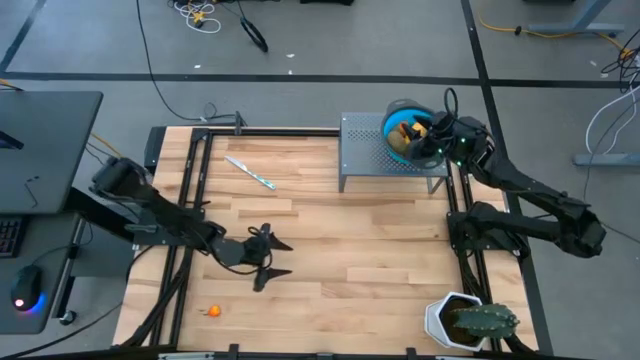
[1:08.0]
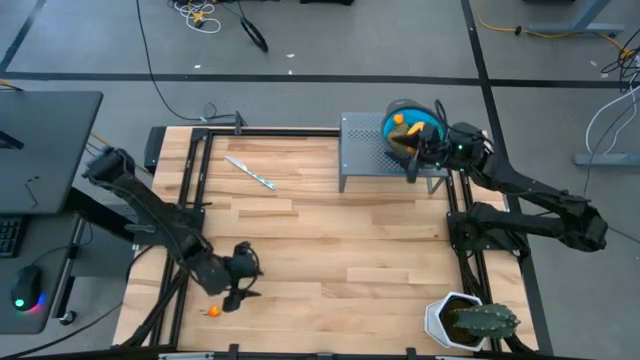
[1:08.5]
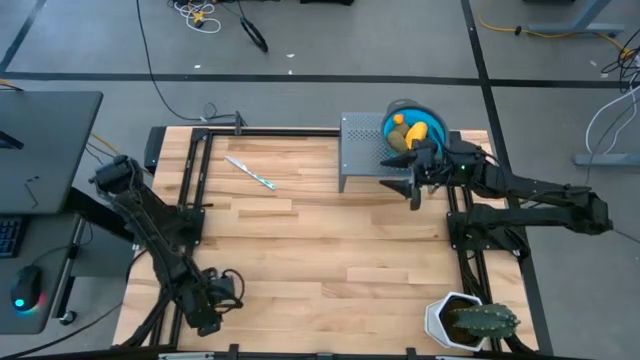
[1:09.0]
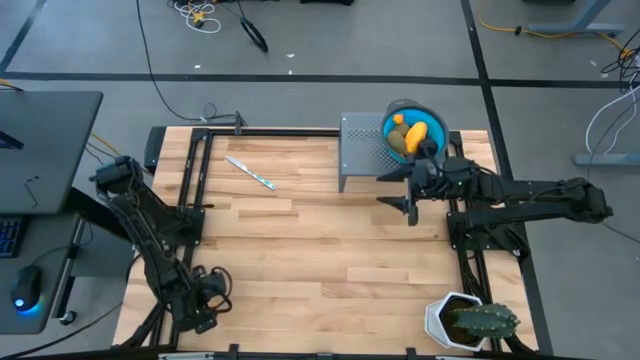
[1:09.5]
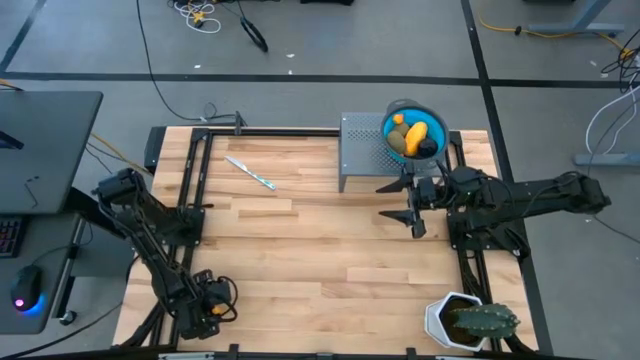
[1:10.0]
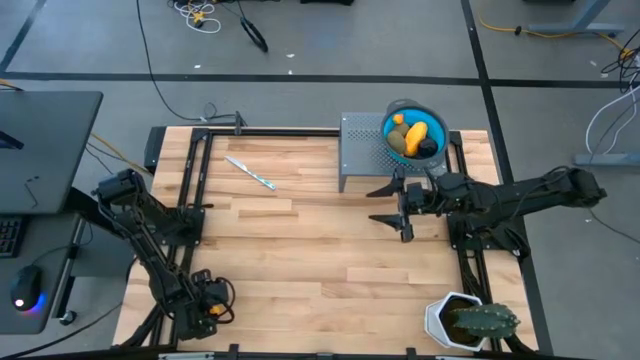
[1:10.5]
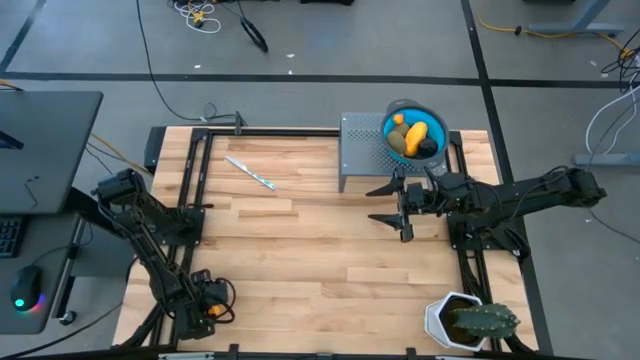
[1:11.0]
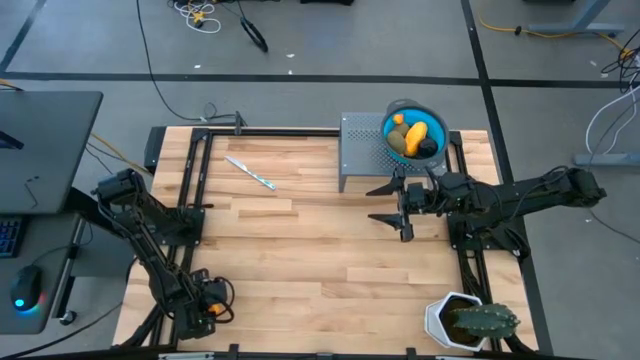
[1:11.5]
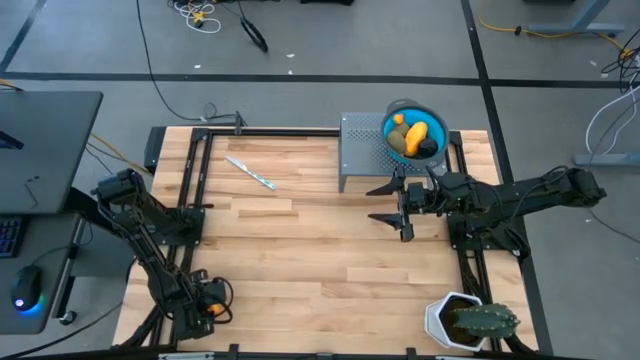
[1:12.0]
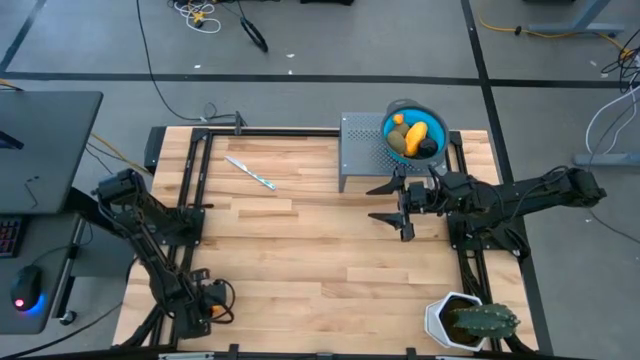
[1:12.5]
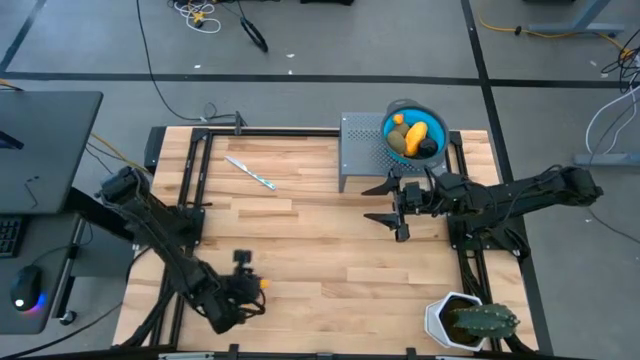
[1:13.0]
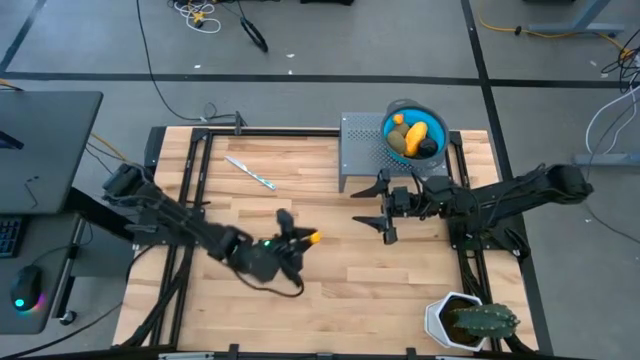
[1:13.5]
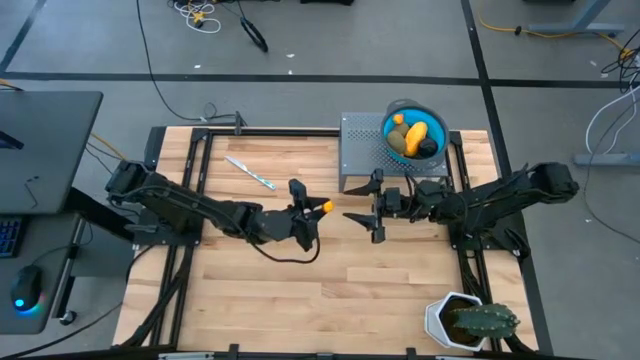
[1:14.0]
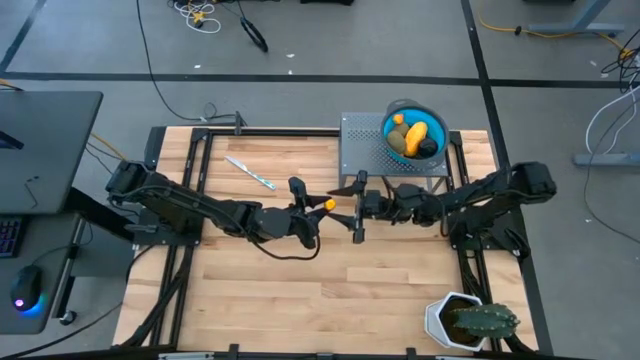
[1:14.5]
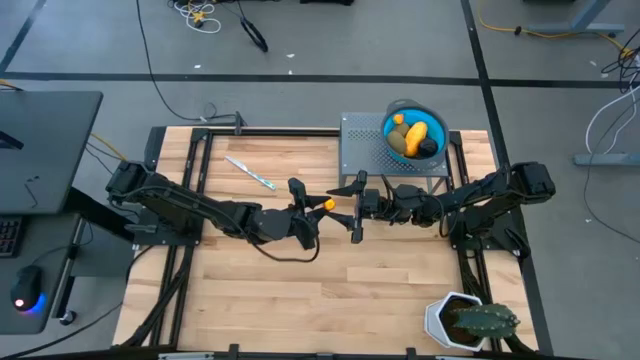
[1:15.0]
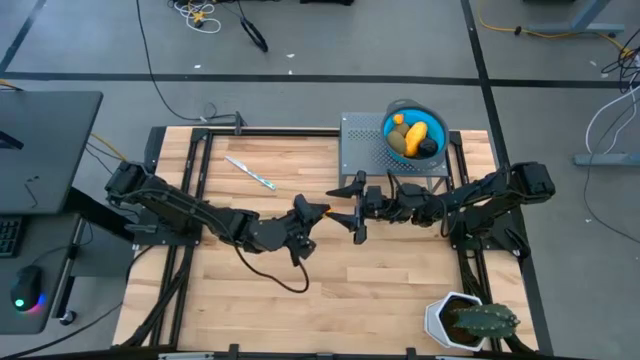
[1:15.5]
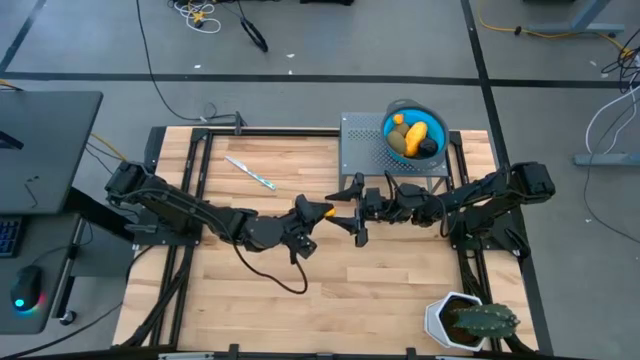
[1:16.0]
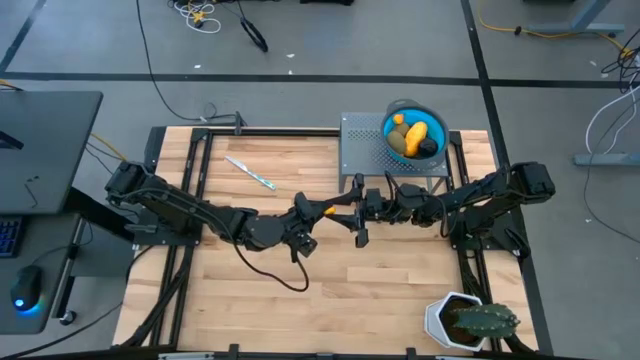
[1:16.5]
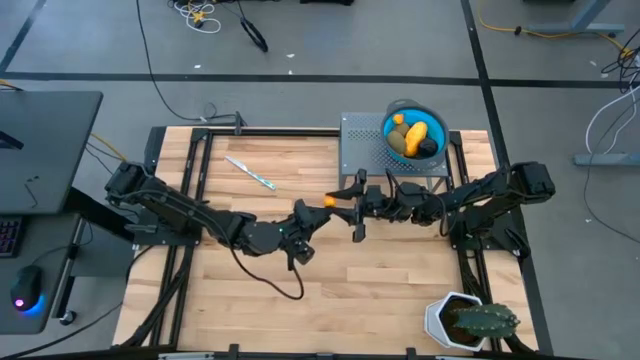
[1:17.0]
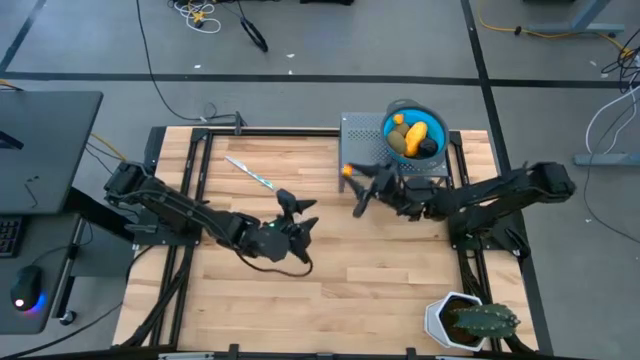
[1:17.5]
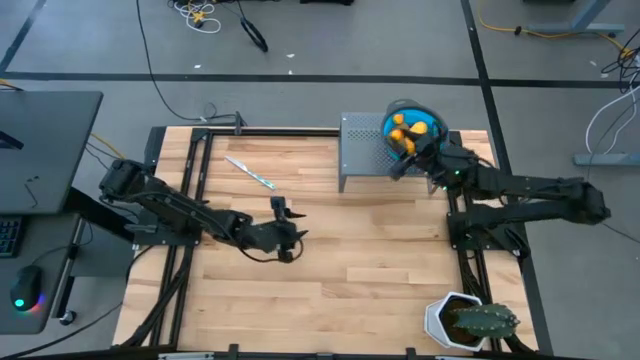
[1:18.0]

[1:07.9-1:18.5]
Task: Pick & Place Fruit
Put the orange pear into the blue strainer bowl on the shelf

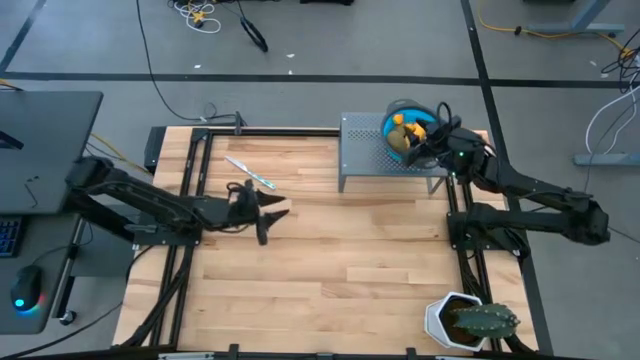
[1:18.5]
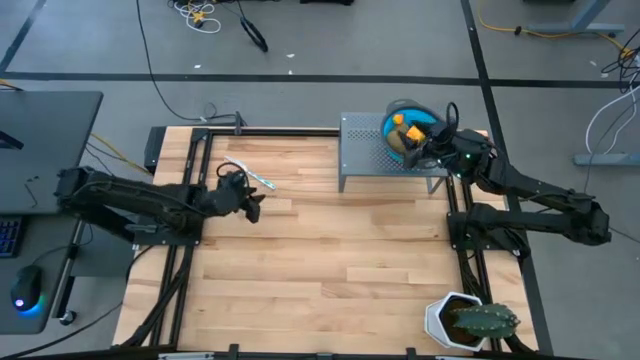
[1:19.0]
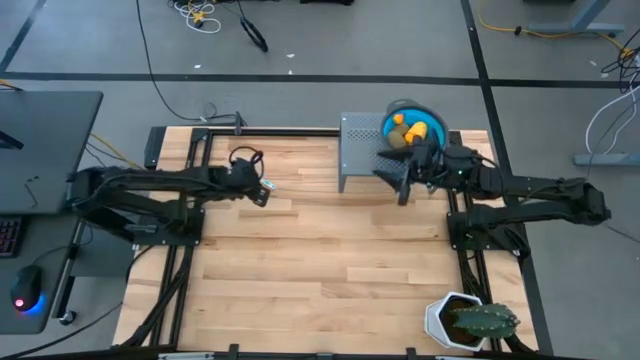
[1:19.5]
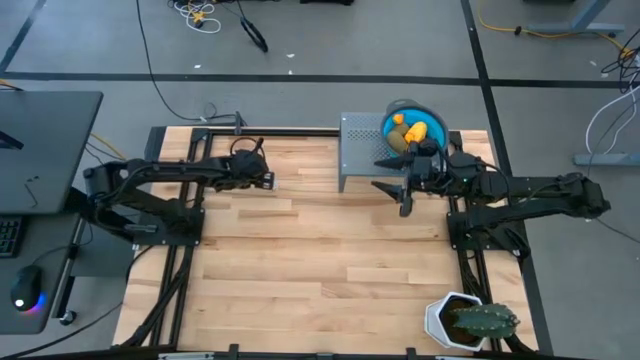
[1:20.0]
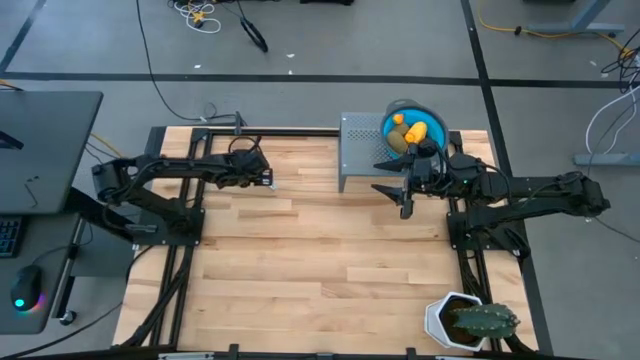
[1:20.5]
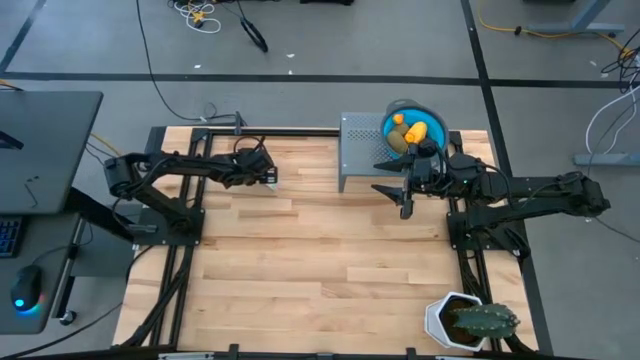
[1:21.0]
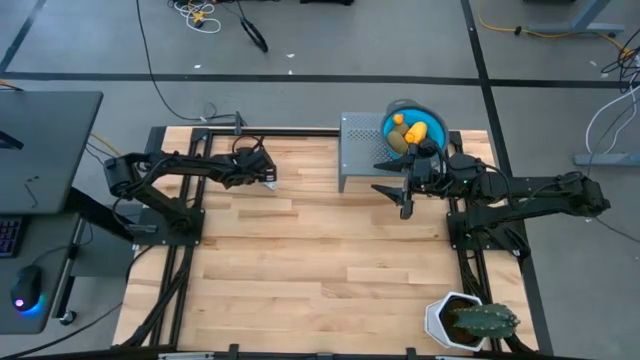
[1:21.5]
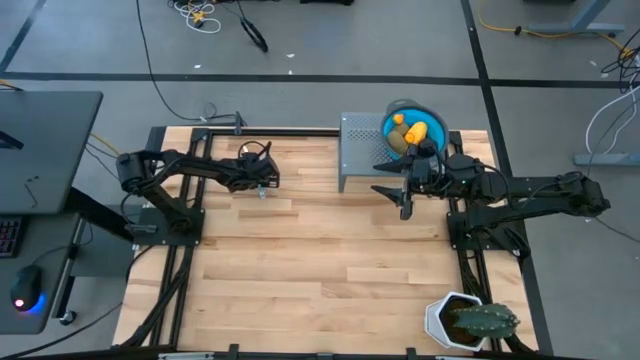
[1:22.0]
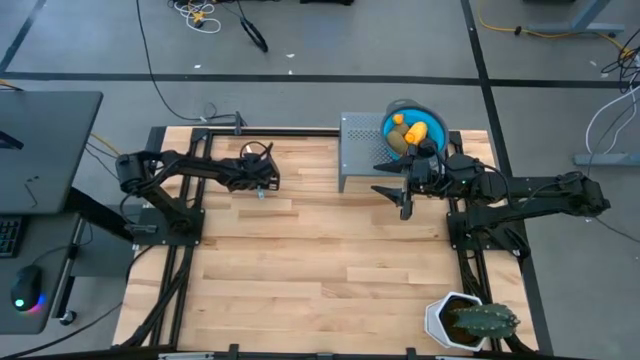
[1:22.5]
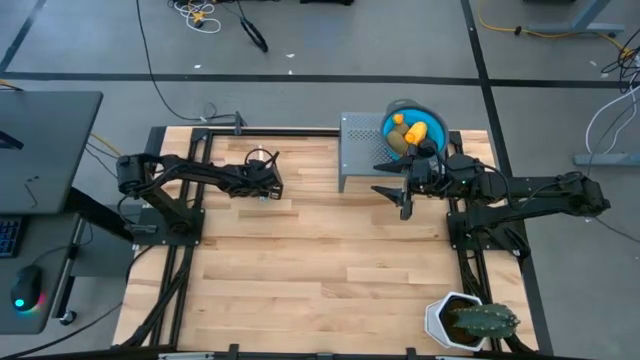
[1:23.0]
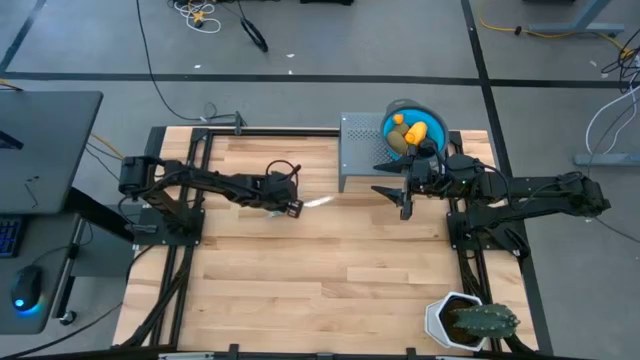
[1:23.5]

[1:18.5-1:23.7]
Put the blue knife on the shelf to the left of the blue strainer bowl

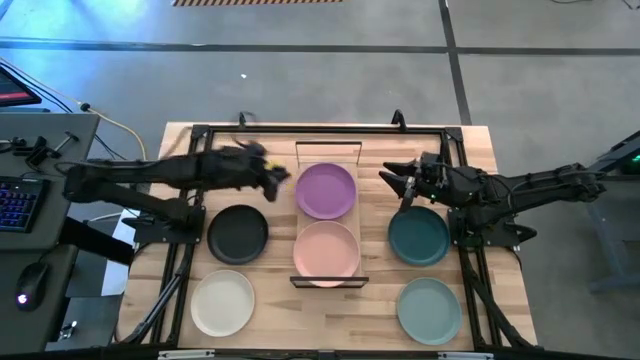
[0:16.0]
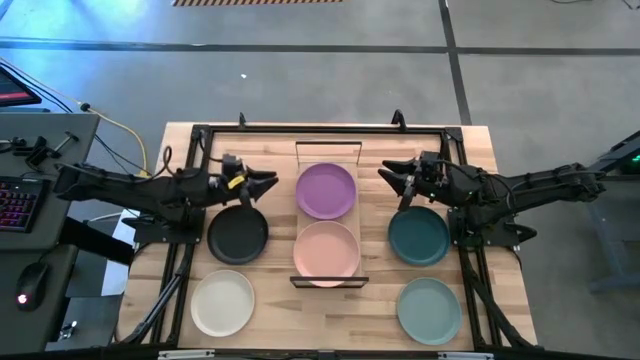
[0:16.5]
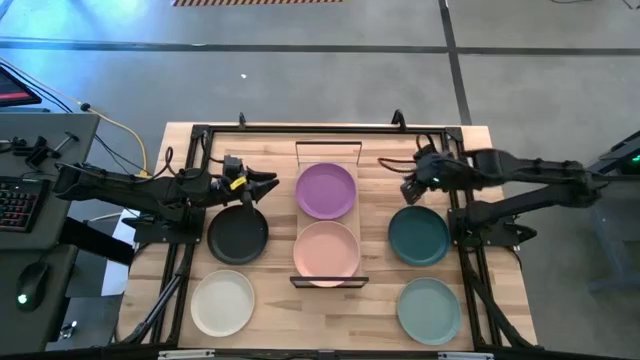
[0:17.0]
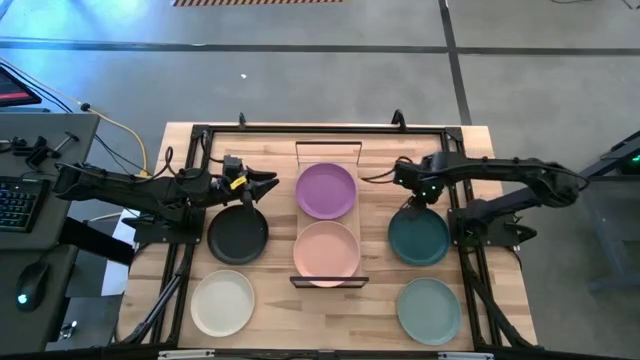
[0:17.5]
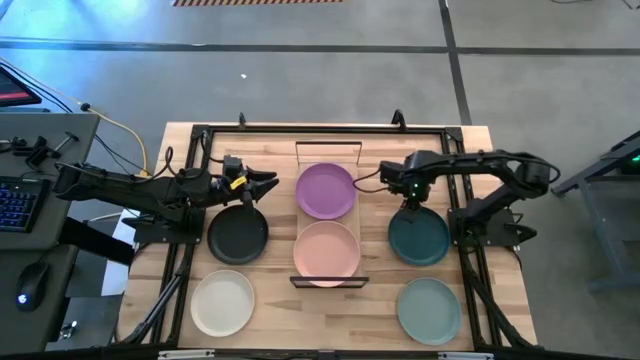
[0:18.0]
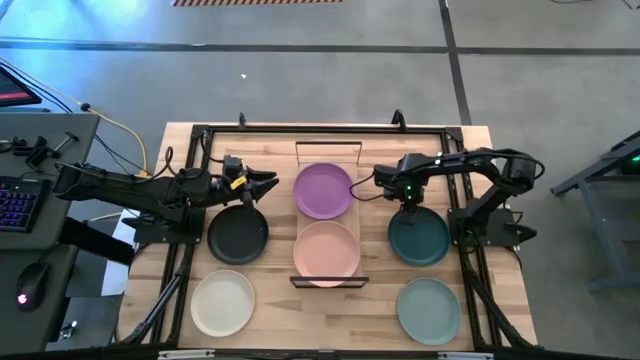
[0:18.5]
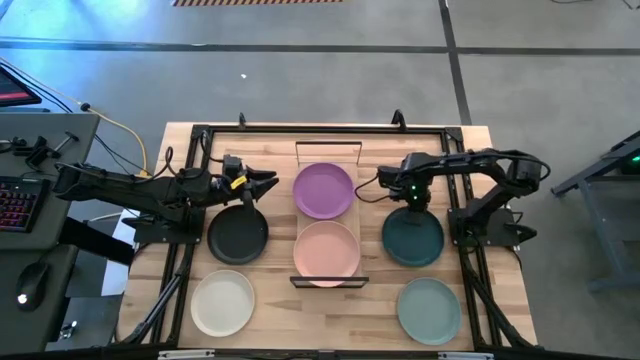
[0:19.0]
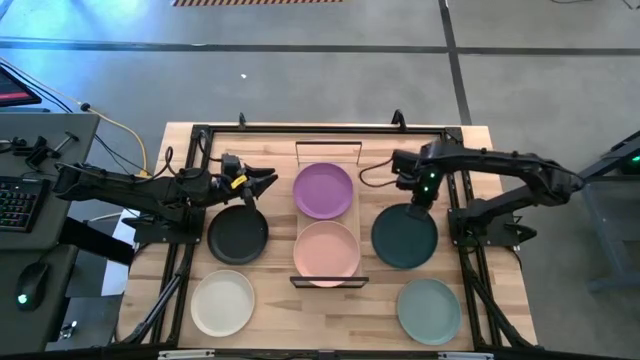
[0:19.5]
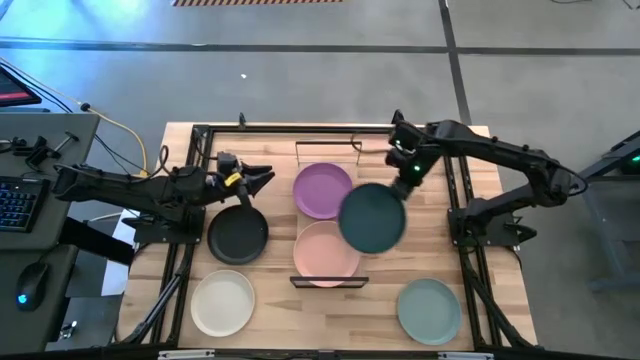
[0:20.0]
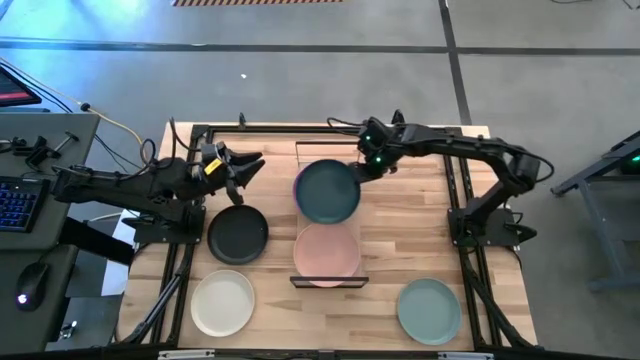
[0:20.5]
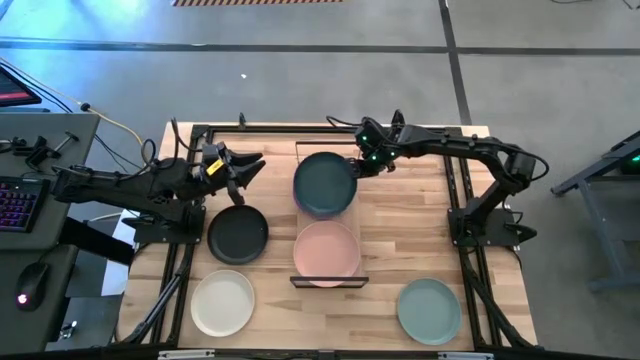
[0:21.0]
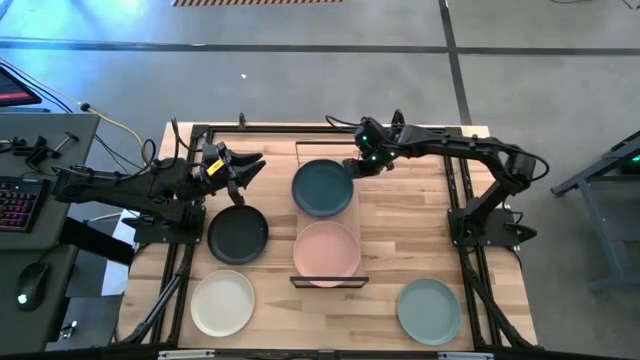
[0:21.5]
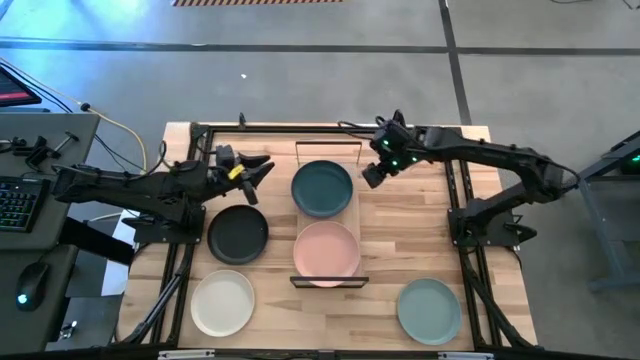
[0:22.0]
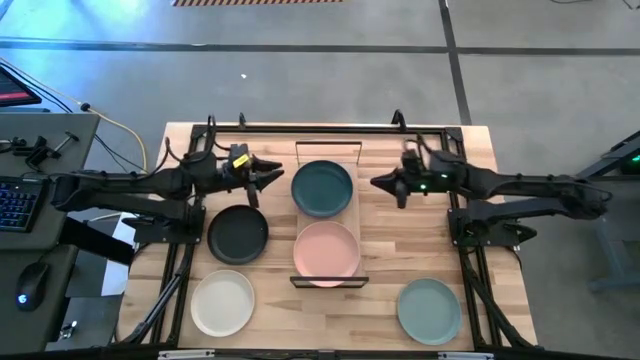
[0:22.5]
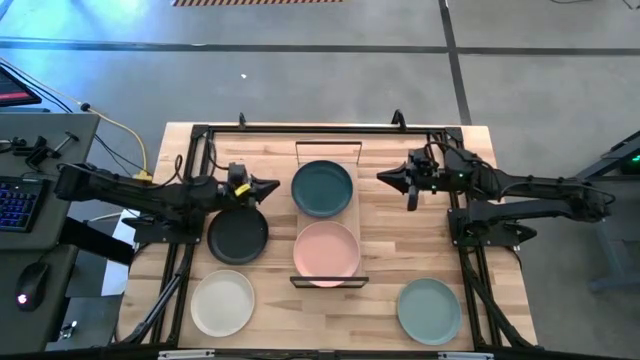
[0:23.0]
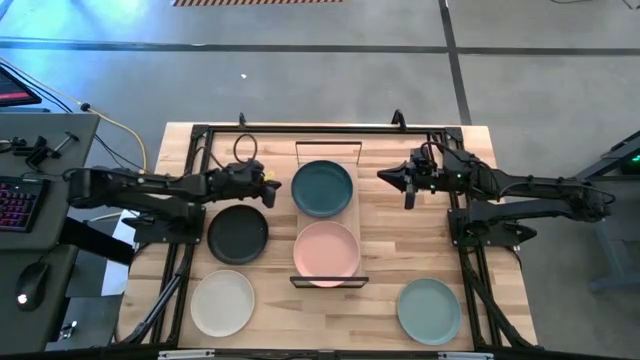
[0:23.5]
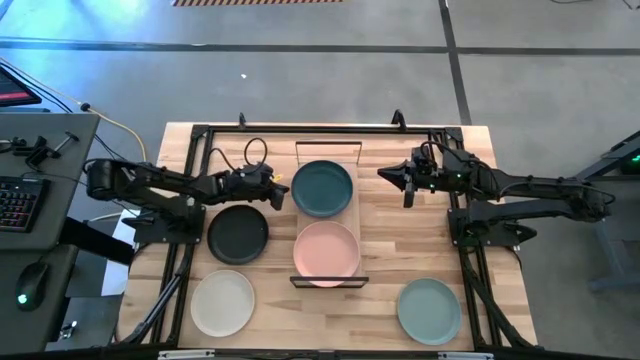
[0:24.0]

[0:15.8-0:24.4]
Task: Place and stack plates onto a shelf
Stack the dark green plate on top of the purple plate on the shelf
